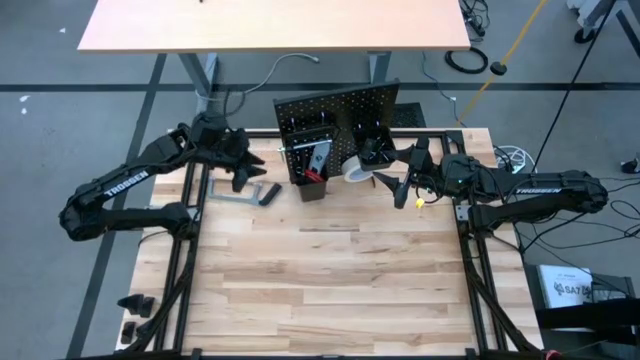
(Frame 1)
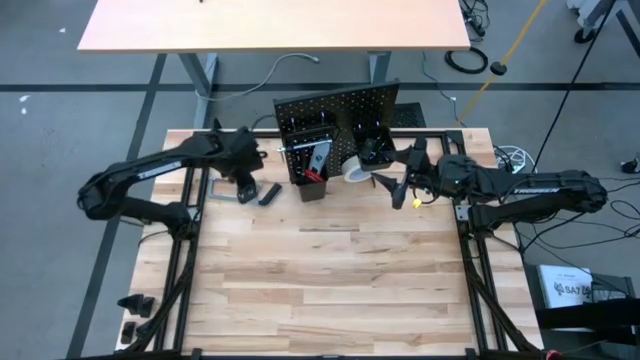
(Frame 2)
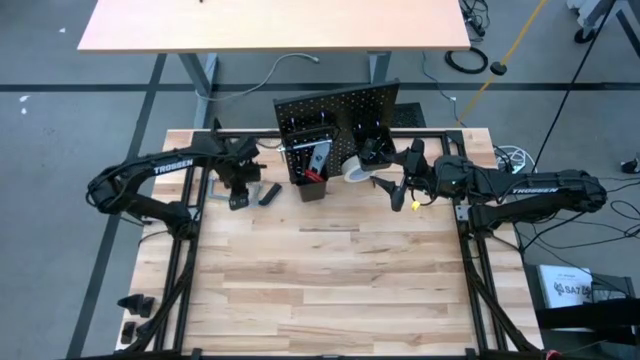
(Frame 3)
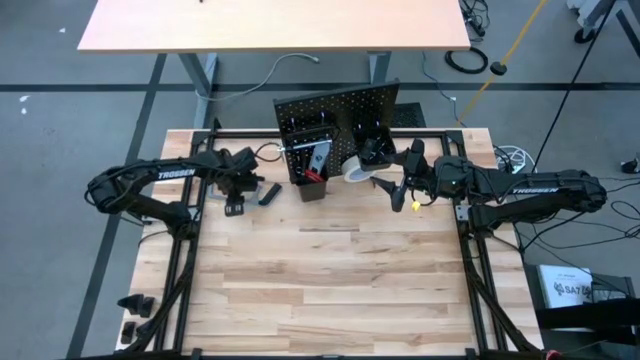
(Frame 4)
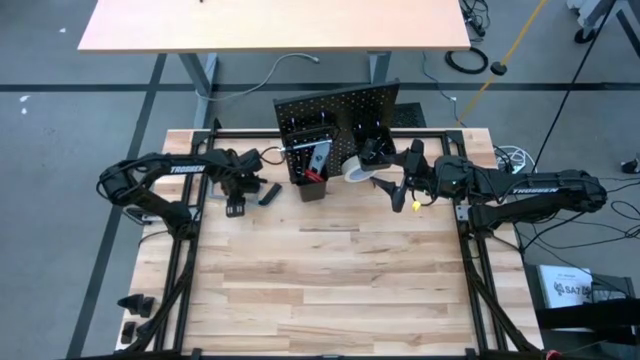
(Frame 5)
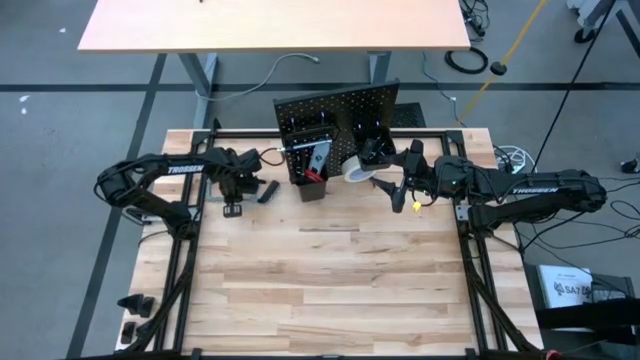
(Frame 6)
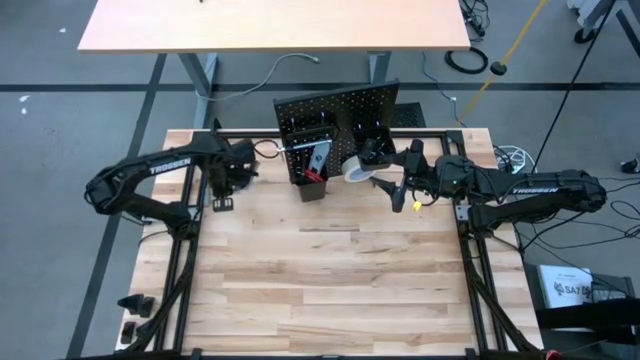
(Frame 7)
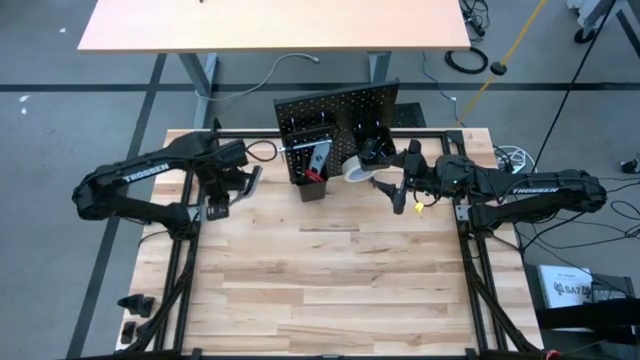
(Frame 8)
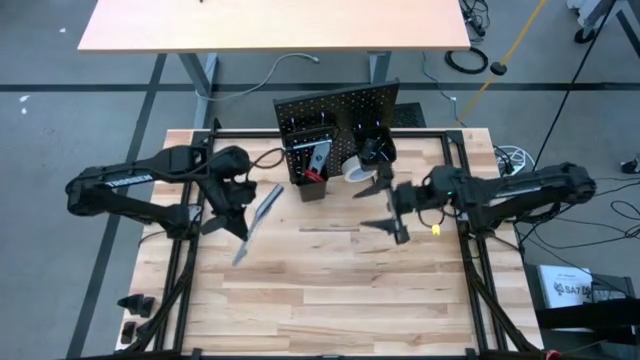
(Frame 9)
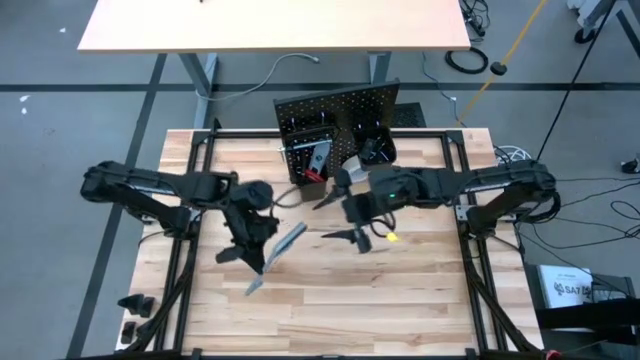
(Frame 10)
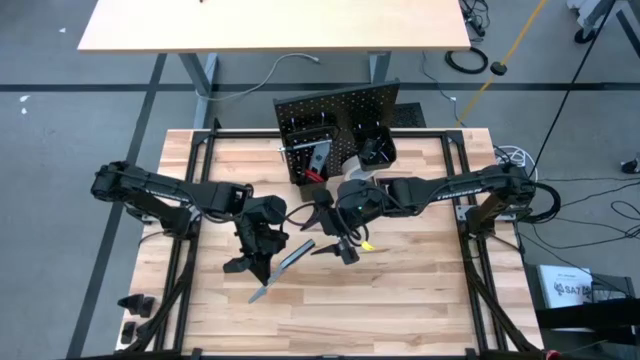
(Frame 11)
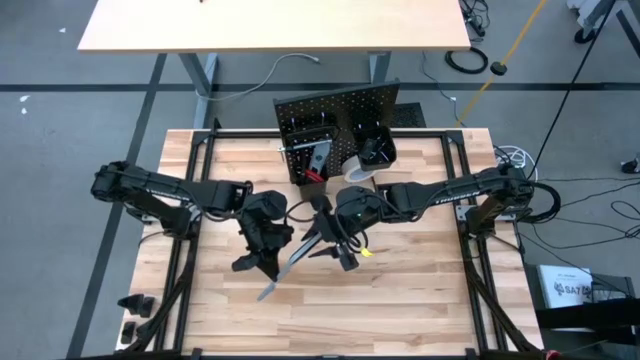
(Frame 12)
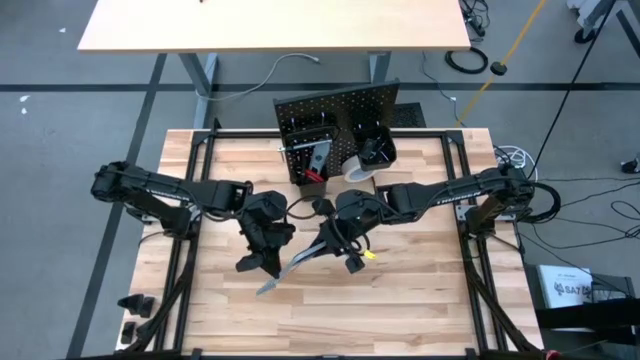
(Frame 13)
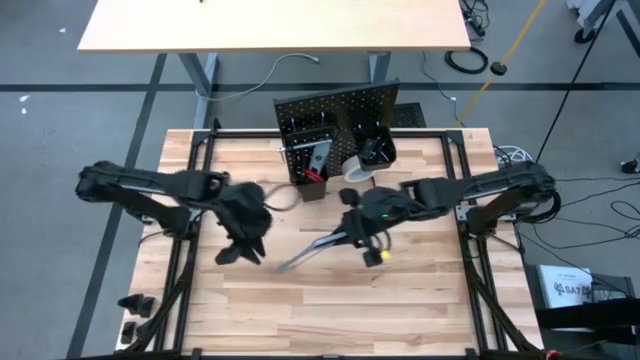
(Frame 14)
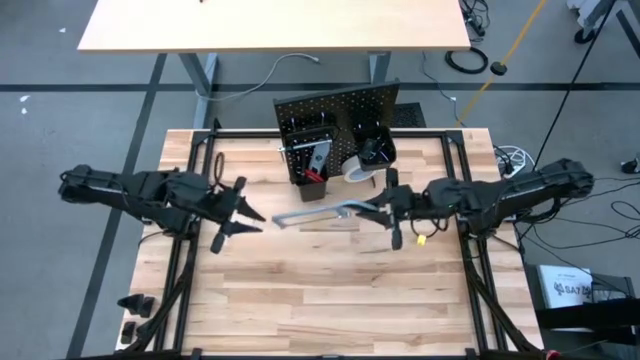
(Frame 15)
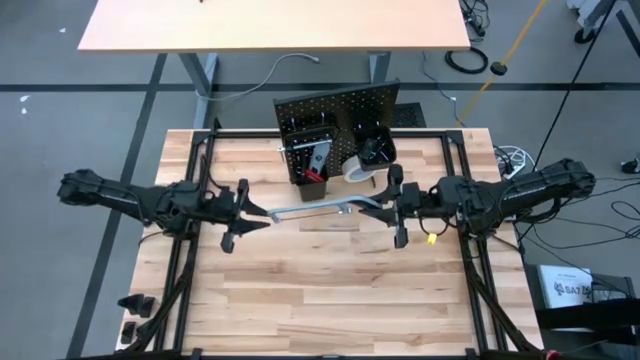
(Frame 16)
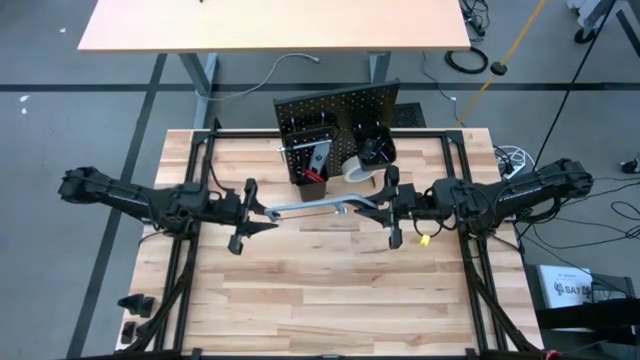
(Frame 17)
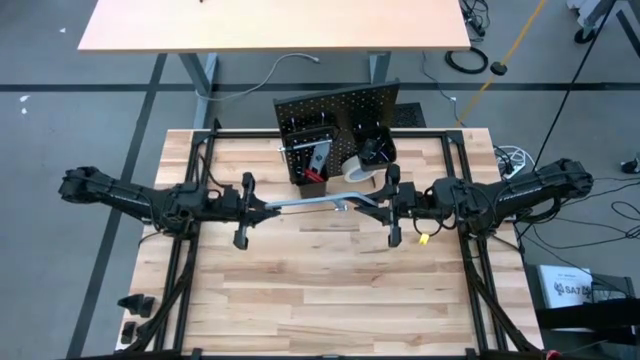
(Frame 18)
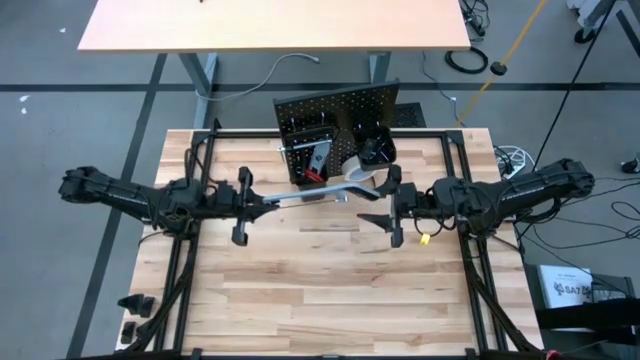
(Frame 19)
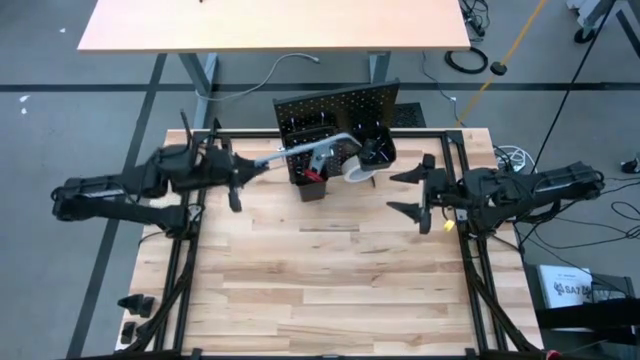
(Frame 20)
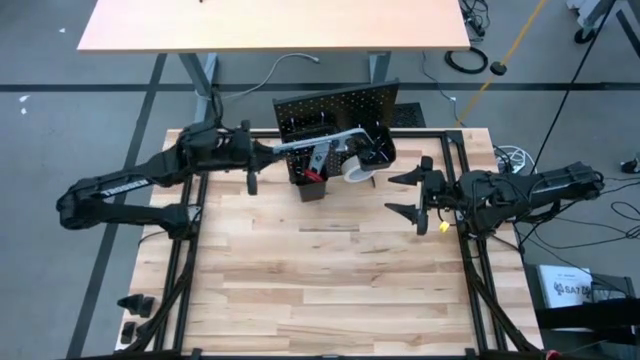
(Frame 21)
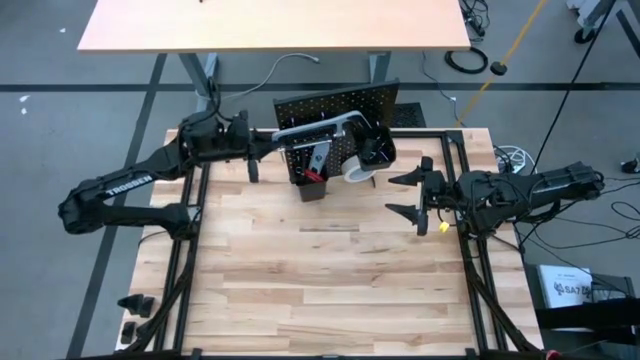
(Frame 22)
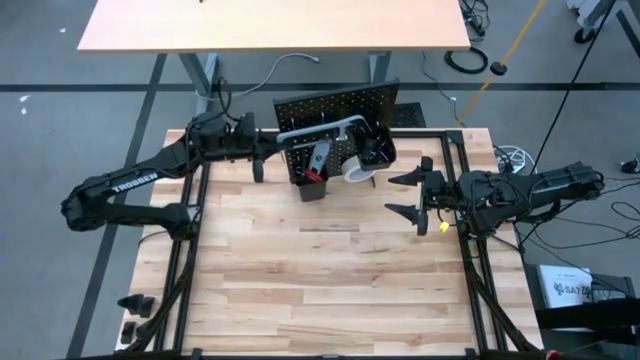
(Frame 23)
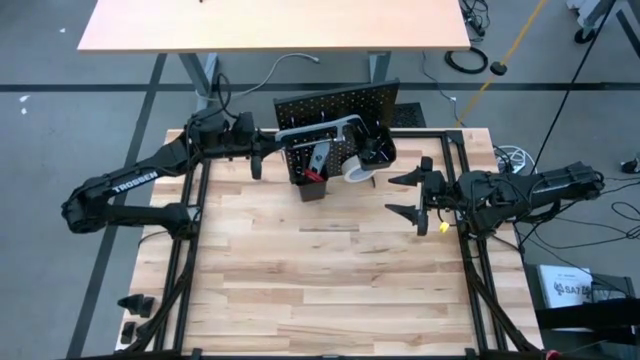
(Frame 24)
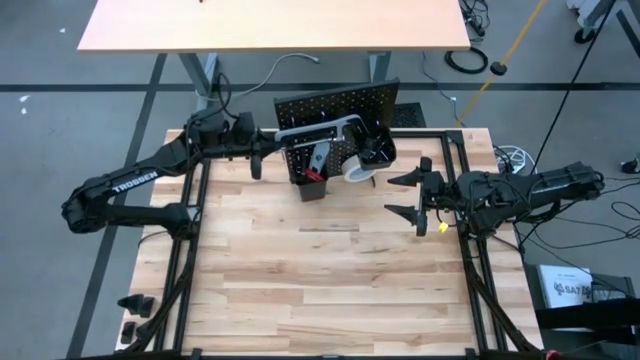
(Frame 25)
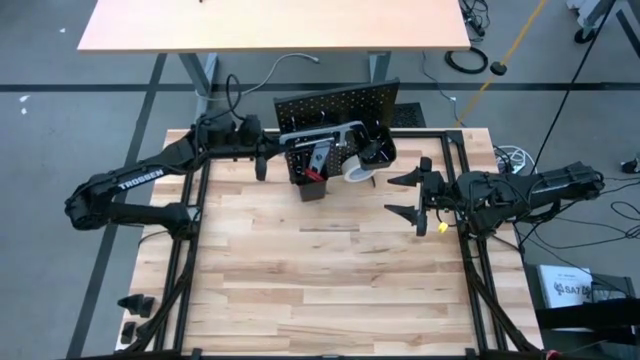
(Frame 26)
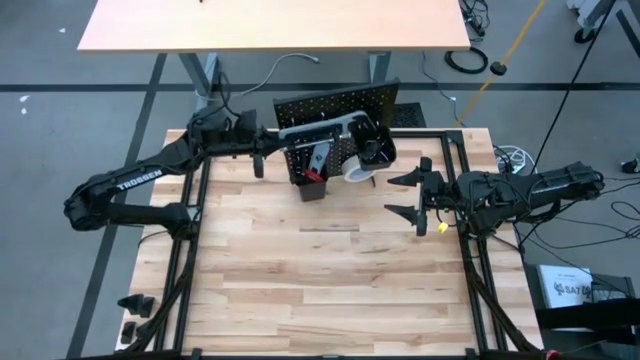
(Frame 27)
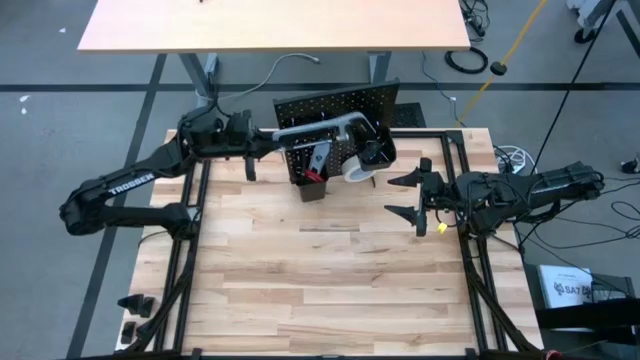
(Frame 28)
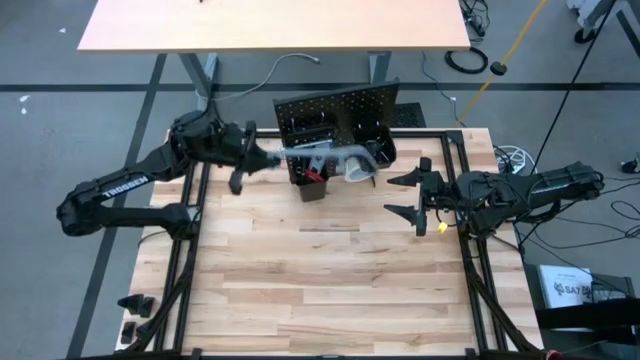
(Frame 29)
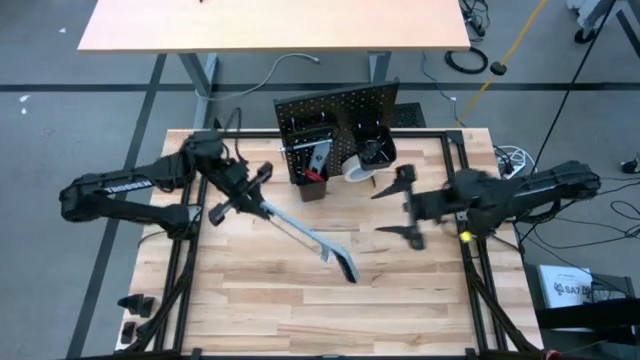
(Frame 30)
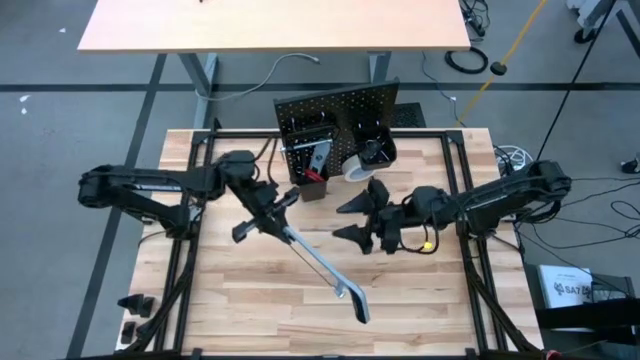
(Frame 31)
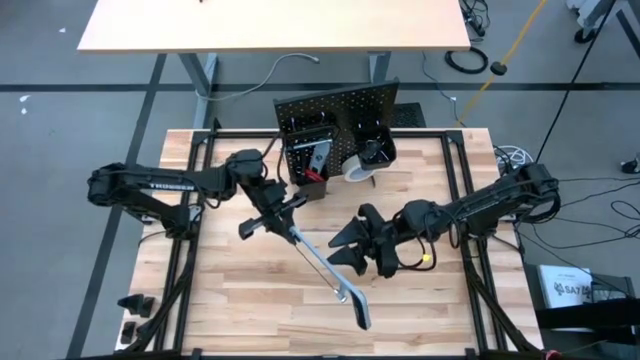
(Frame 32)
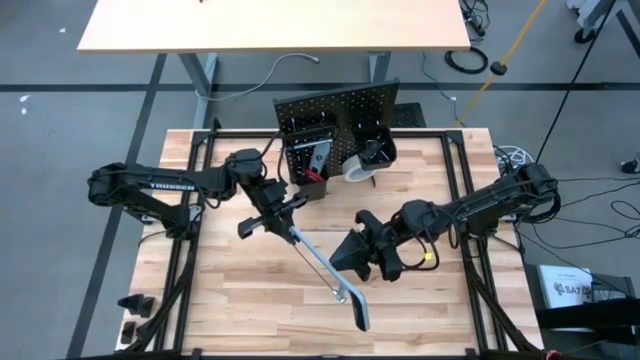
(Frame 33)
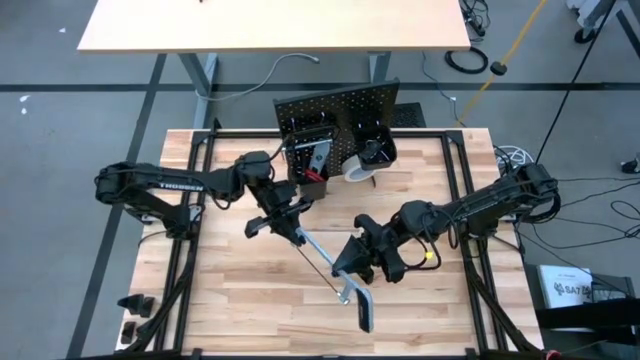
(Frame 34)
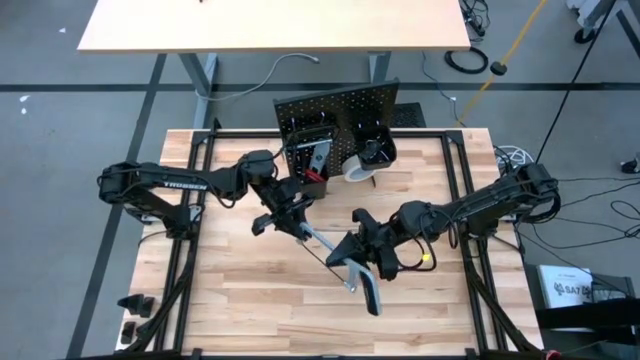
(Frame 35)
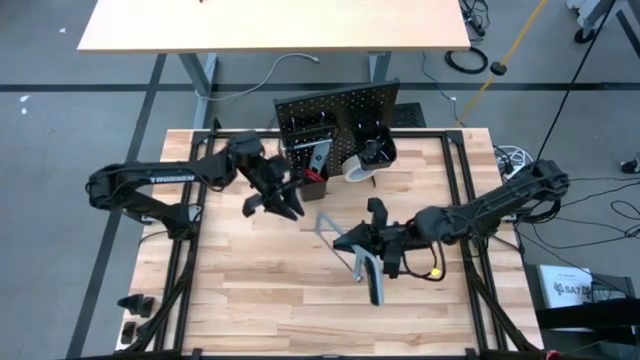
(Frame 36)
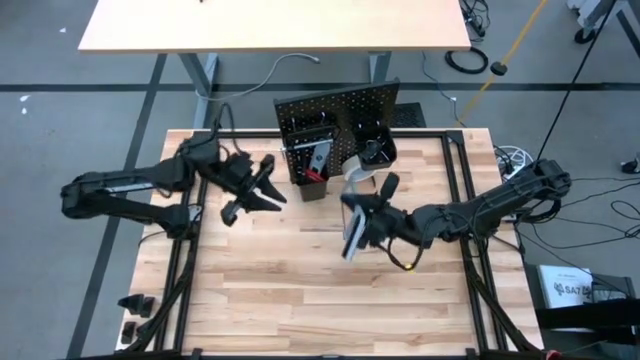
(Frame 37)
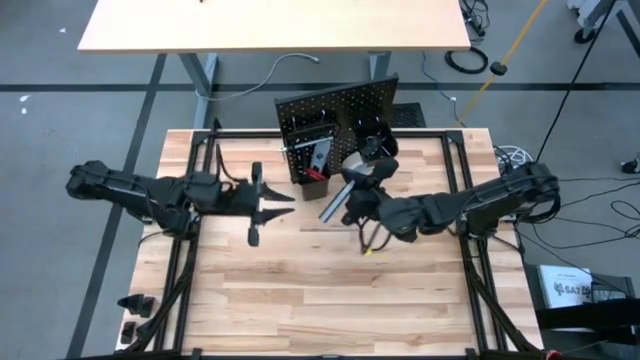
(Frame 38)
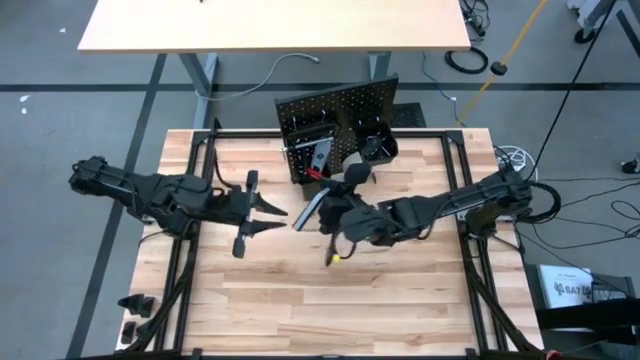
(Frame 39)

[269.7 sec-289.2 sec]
Task: Hang tools onto peg board
Hang the hacksaw on the pegboard

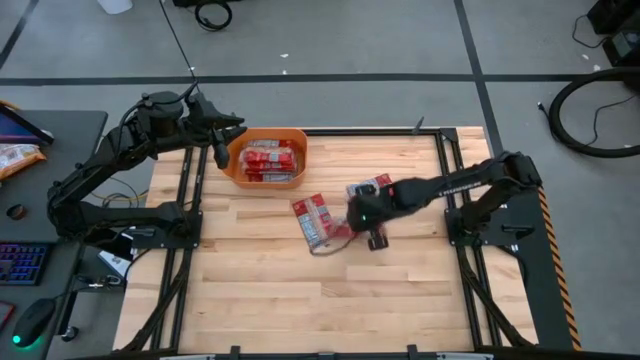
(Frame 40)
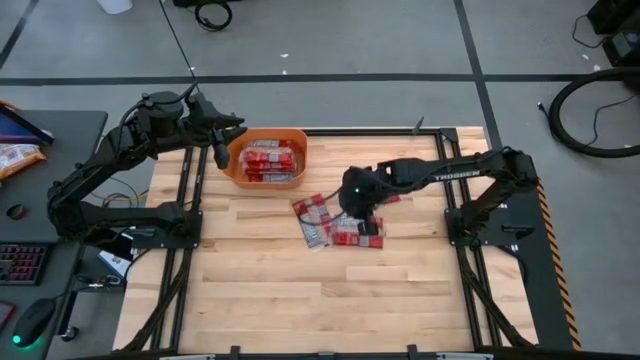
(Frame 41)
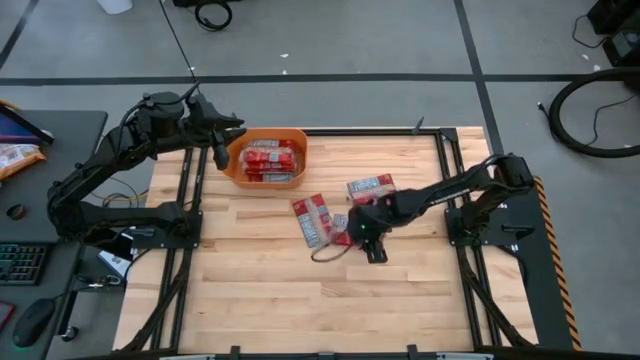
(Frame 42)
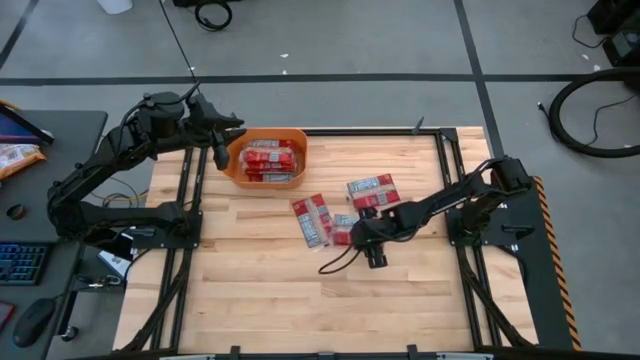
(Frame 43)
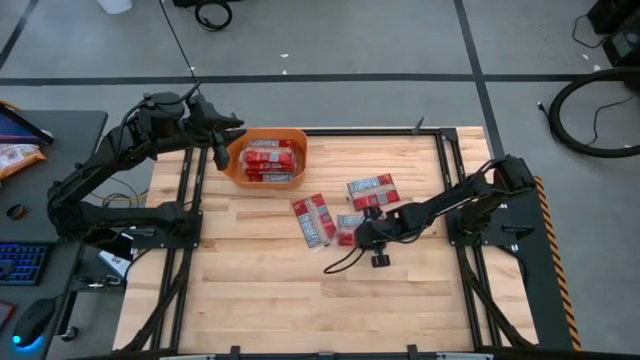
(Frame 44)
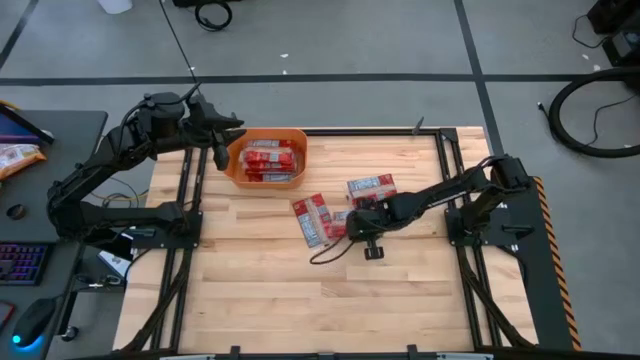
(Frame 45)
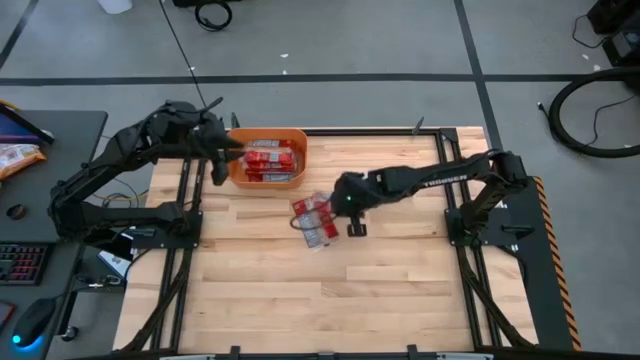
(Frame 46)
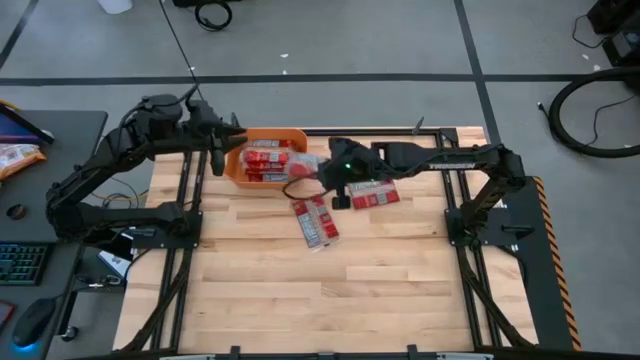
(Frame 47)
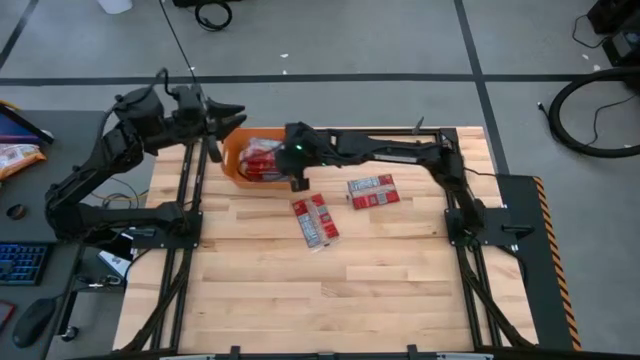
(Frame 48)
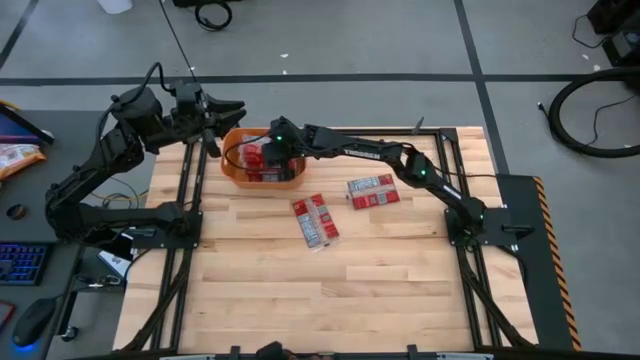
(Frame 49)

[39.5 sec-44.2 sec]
Task: Sort popcorn bags into baskets
Put the bottom right red popcorn bag into the orange container
